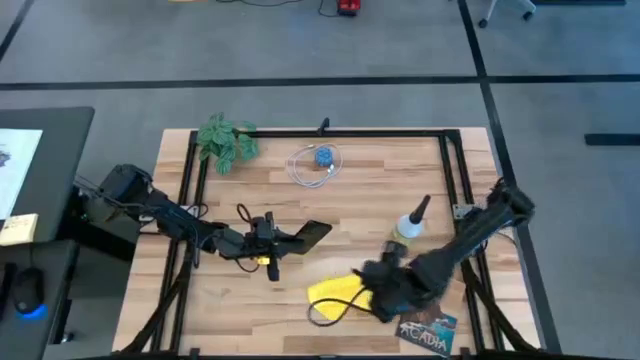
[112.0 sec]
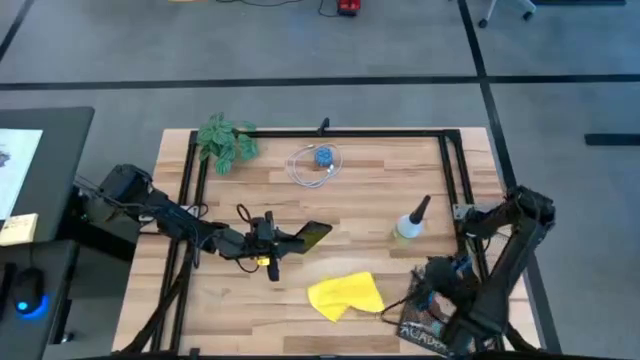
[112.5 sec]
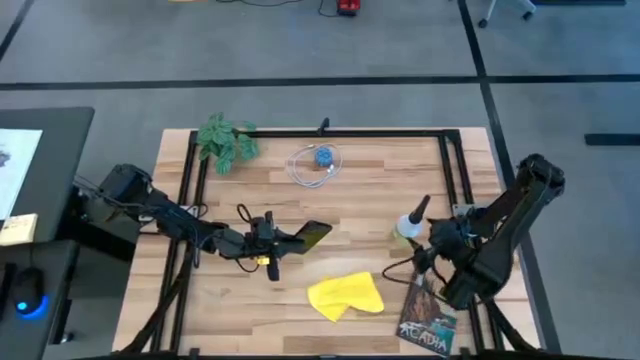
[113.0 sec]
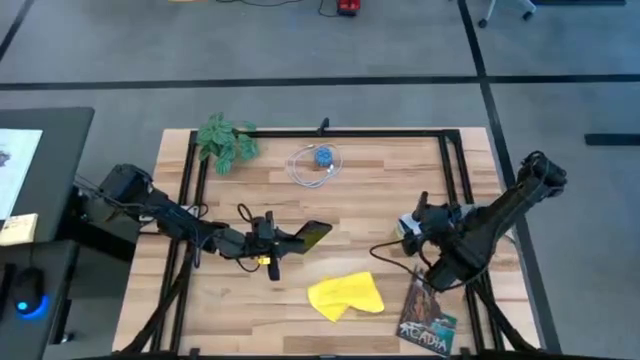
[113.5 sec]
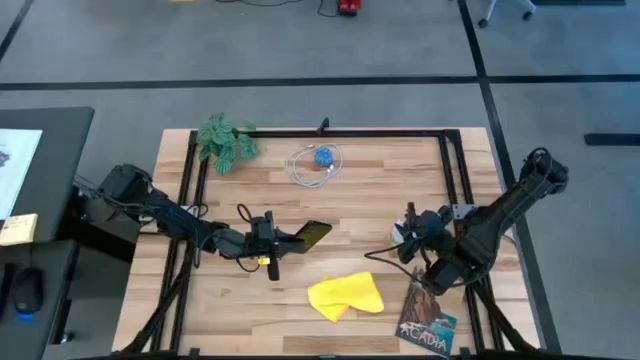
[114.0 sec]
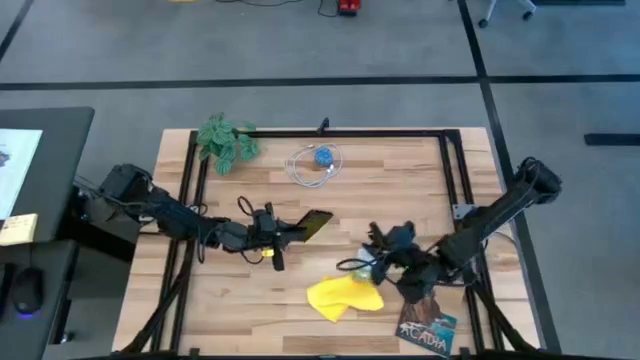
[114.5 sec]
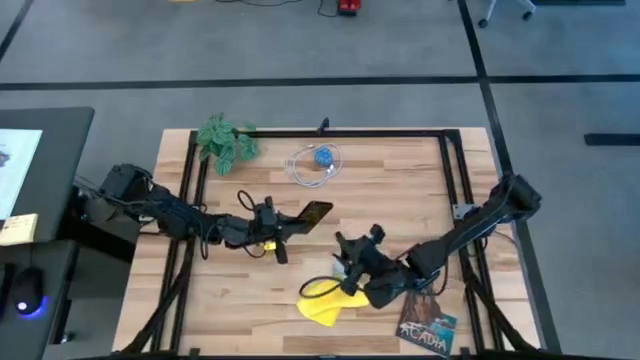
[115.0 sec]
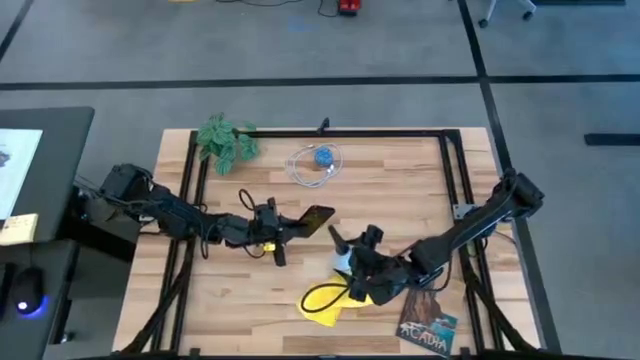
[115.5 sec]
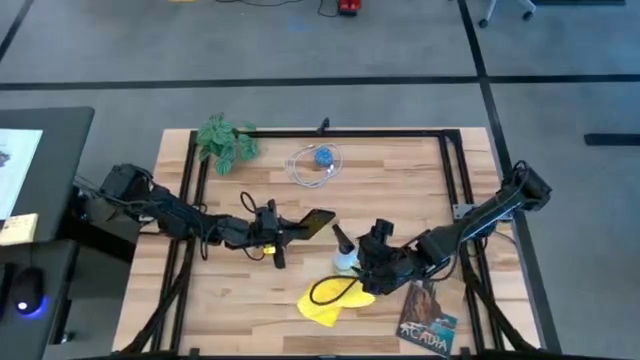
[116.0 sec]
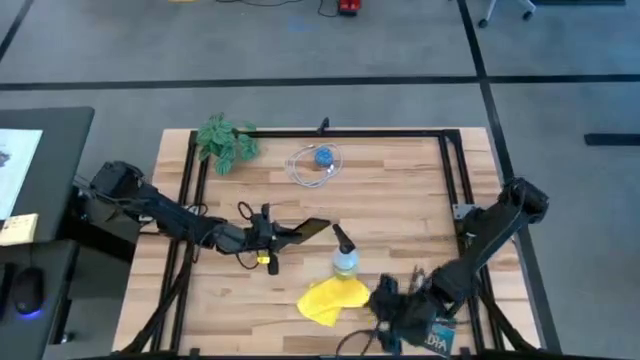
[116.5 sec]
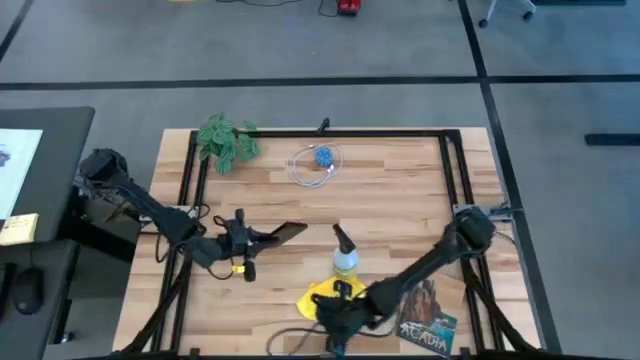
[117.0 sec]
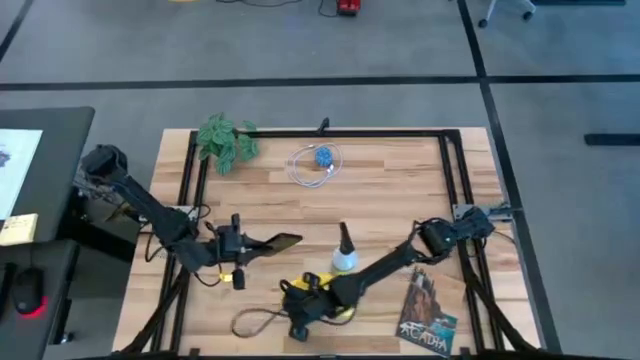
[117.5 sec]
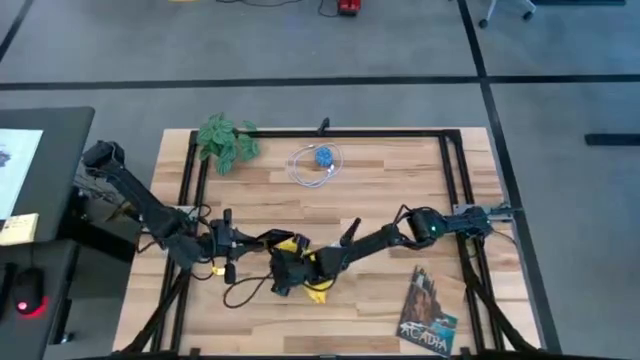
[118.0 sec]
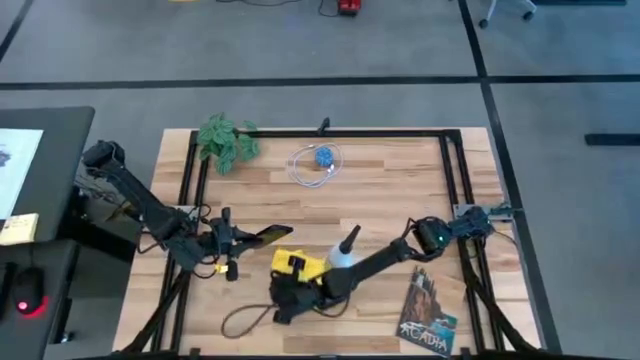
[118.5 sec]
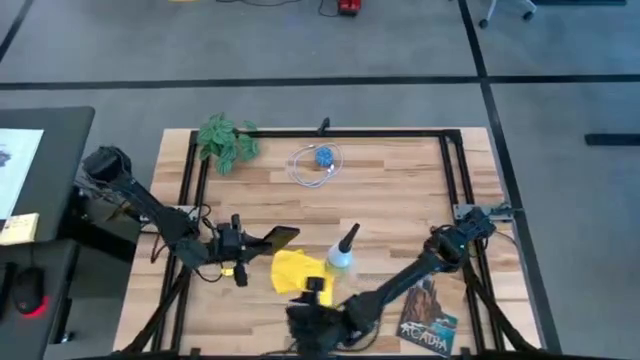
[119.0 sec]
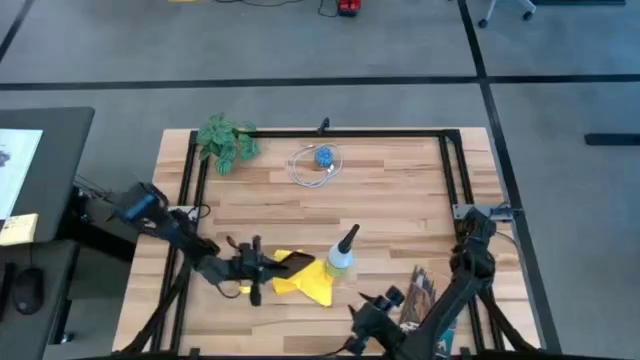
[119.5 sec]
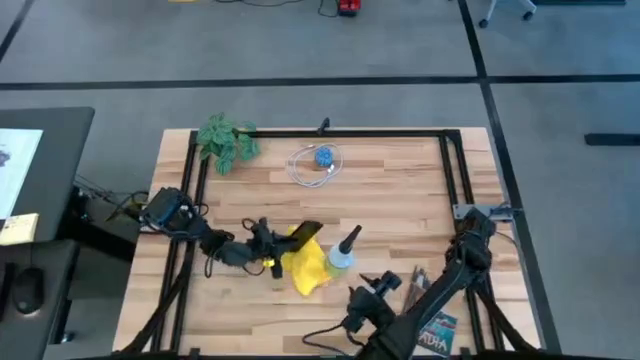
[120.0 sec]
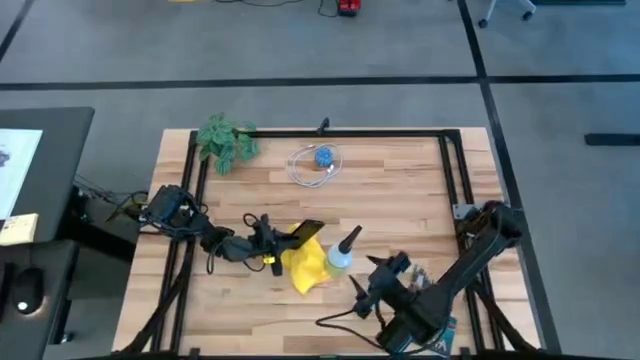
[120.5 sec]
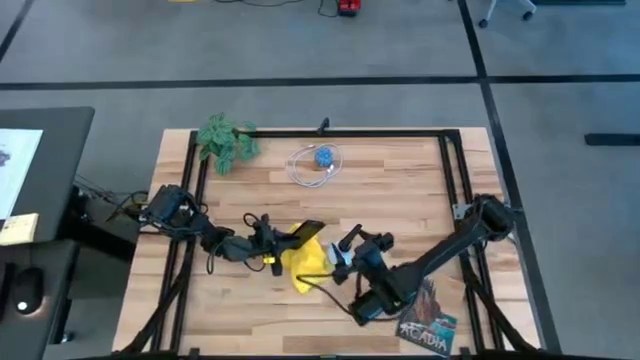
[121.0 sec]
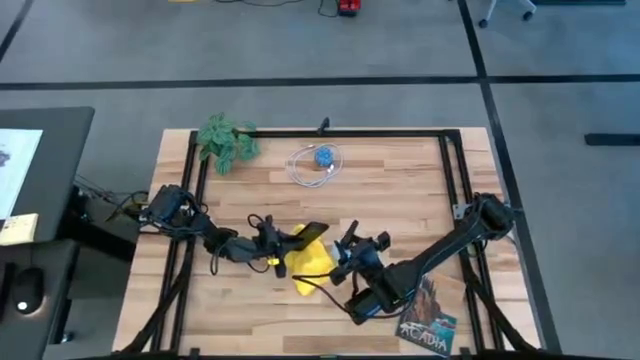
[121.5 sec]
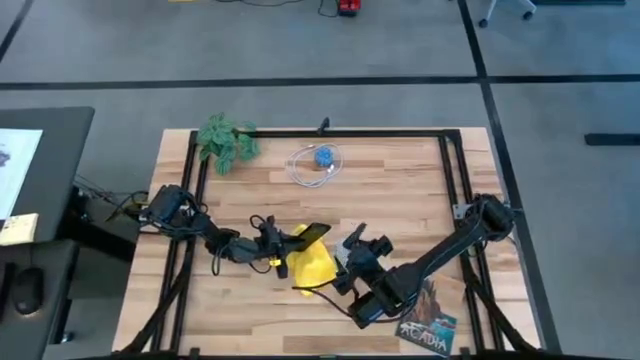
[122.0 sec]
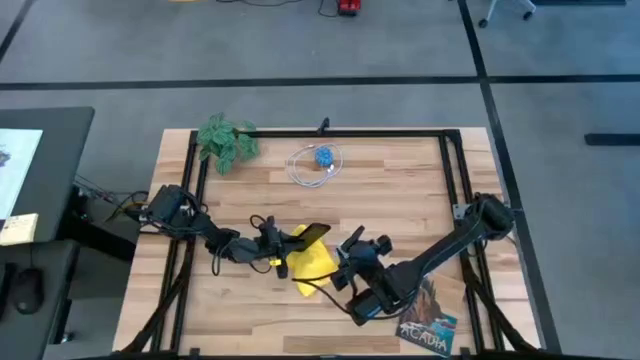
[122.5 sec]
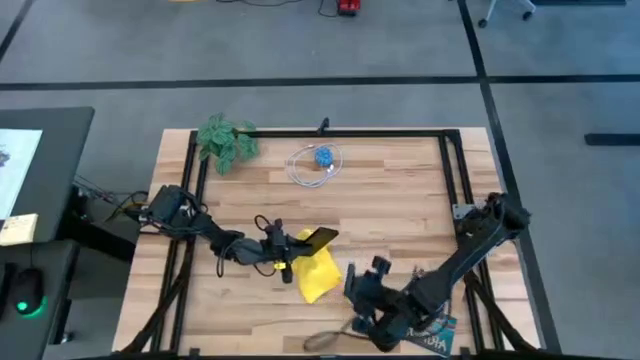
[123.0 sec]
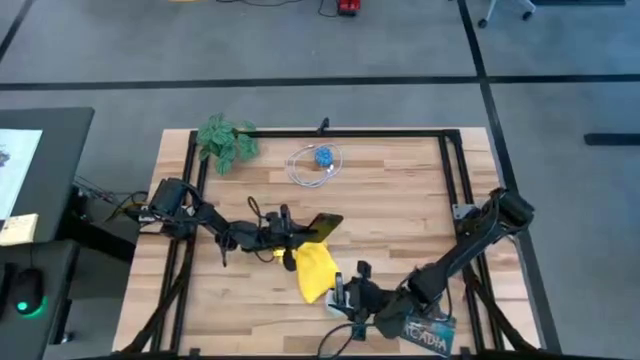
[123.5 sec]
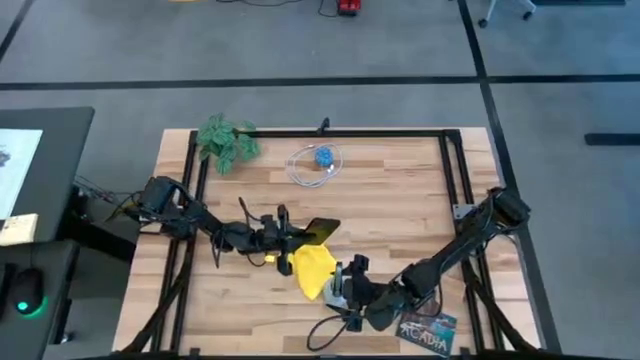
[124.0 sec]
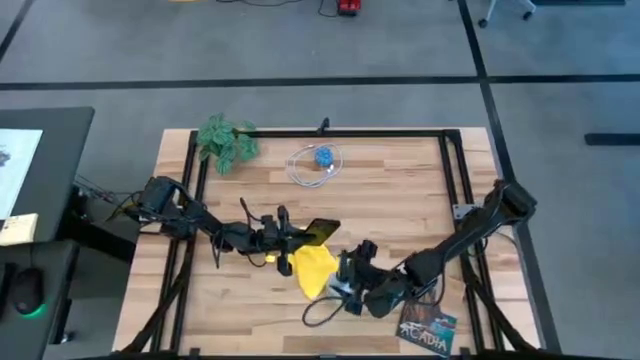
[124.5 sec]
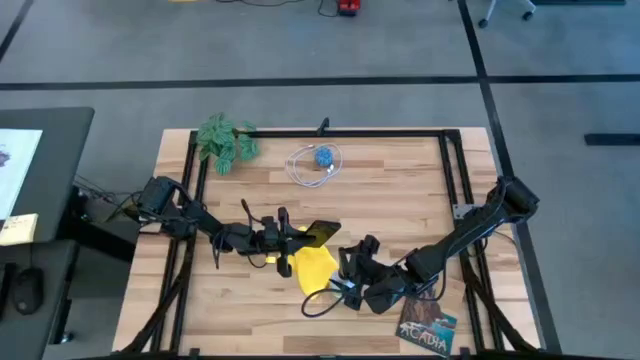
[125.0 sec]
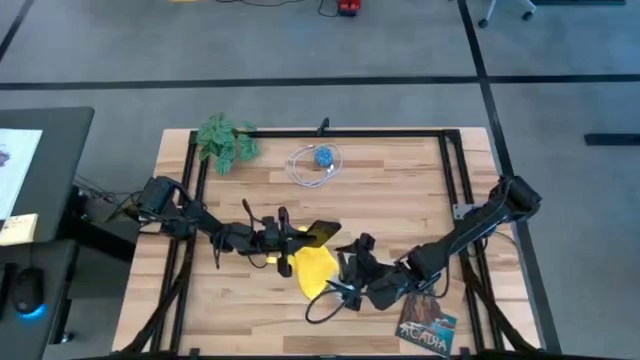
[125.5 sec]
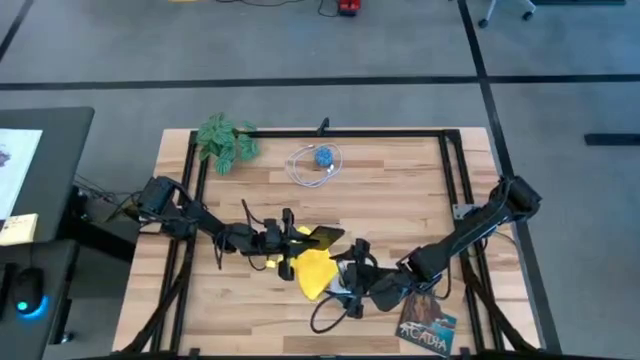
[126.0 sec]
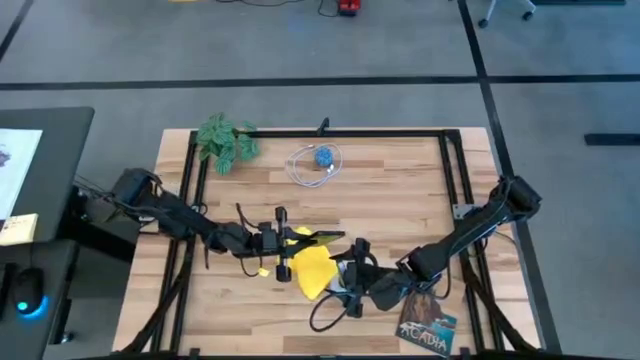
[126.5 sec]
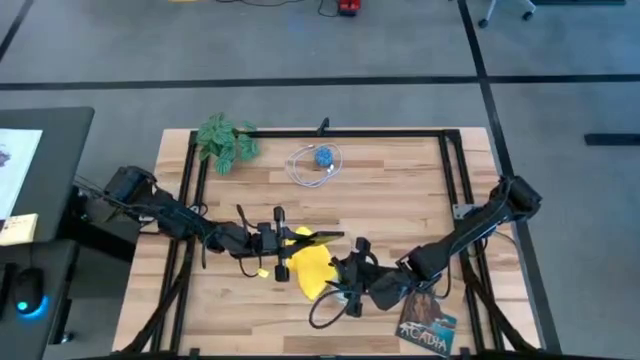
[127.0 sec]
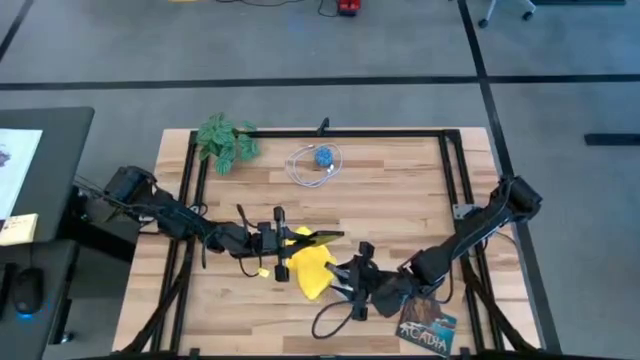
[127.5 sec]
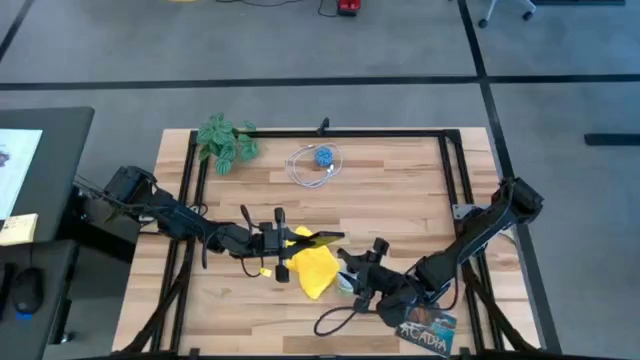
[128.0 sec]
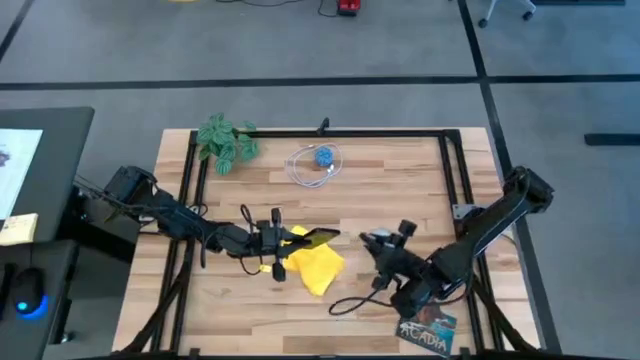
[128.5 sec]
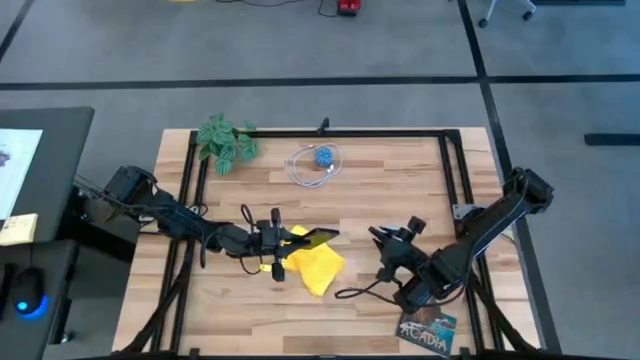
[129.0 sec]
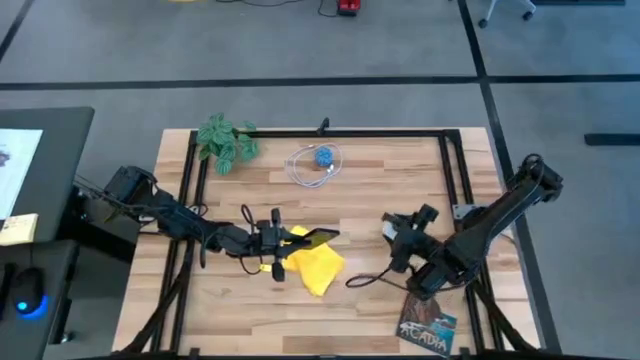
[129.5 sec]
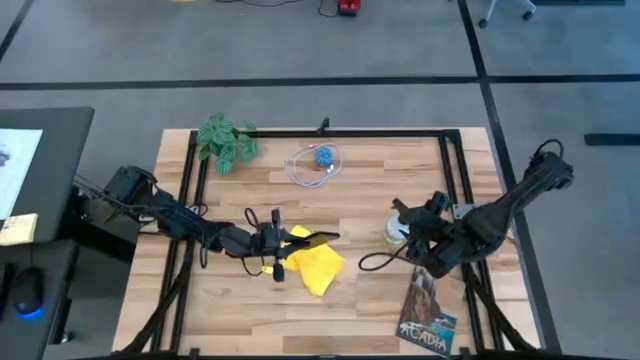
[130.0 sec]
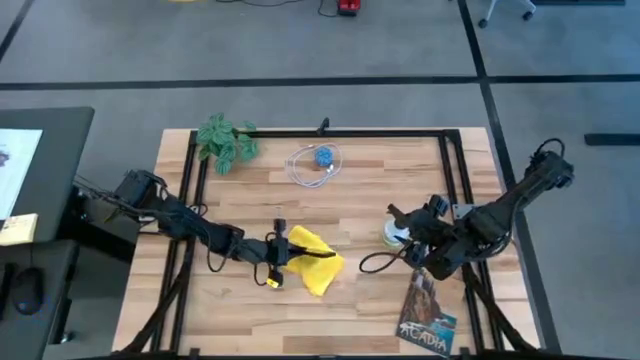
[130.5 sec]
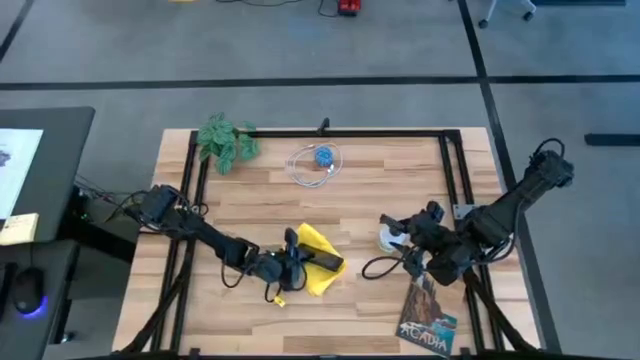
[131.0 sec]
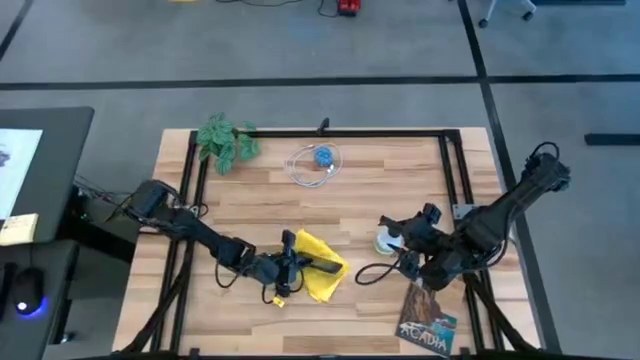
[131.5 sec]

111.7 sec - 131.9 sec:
Task: Apply microfiber cloth
Spray the back of the cellphone using a cleaning bottles
